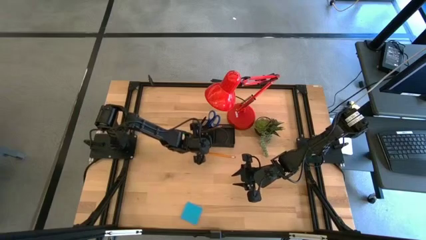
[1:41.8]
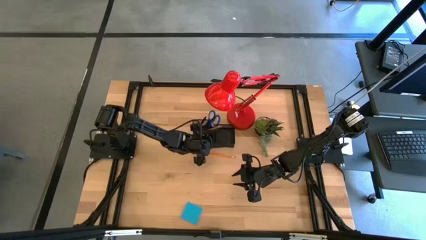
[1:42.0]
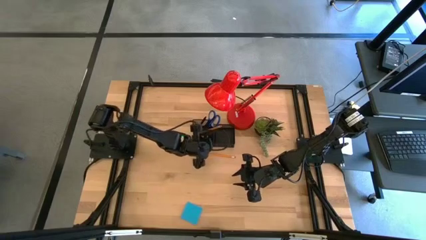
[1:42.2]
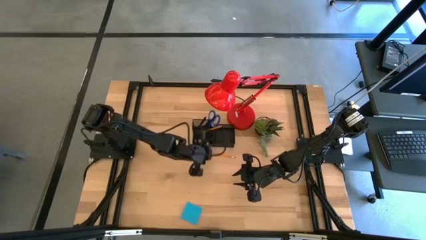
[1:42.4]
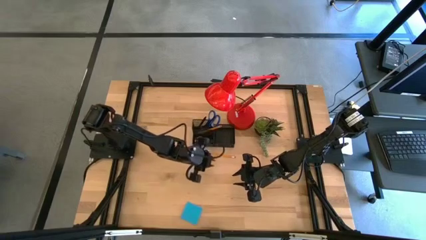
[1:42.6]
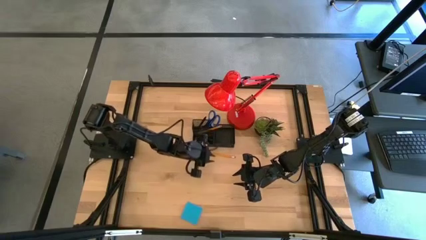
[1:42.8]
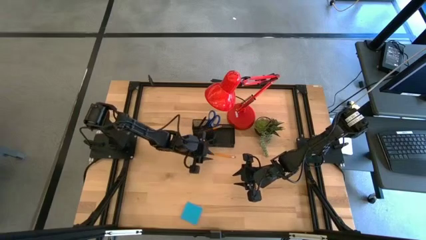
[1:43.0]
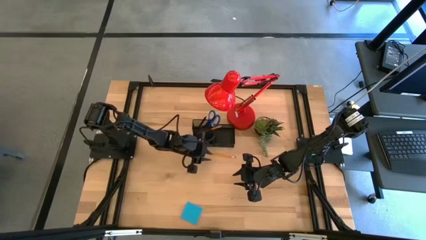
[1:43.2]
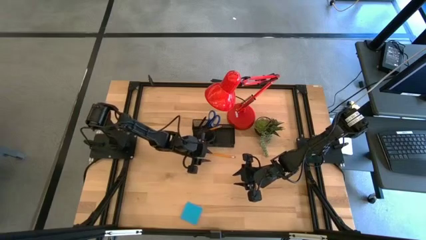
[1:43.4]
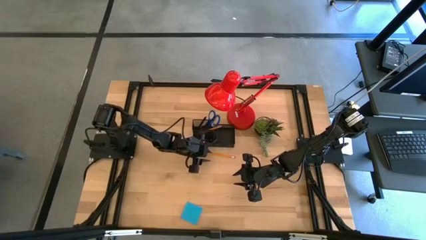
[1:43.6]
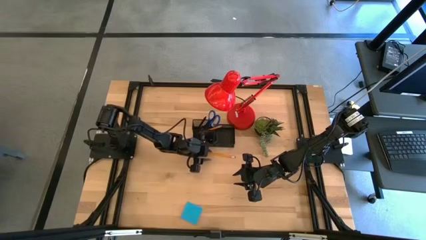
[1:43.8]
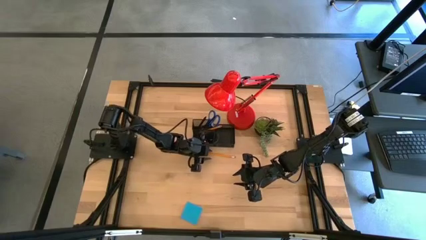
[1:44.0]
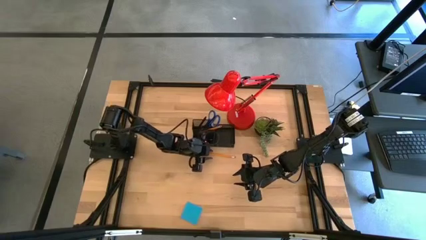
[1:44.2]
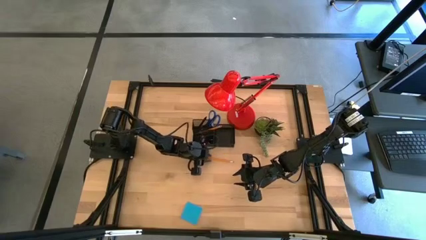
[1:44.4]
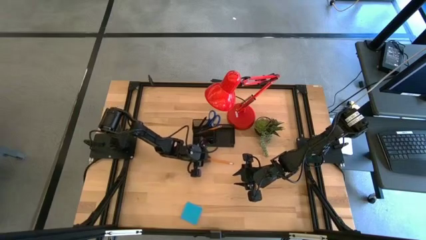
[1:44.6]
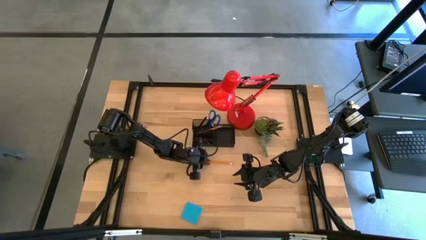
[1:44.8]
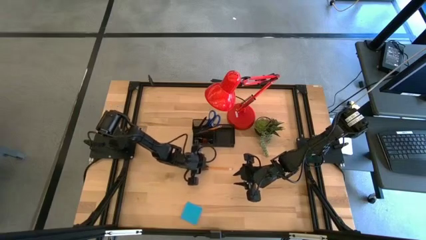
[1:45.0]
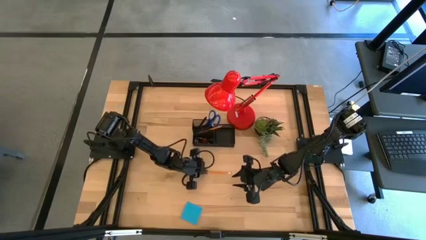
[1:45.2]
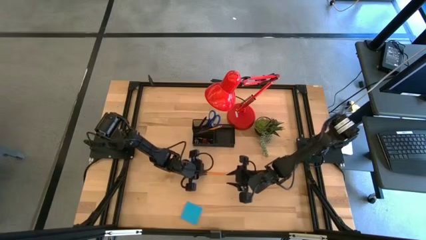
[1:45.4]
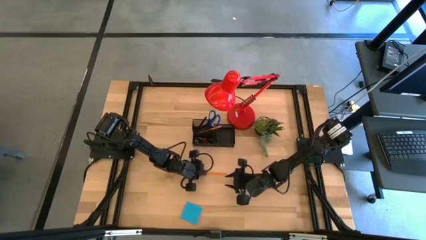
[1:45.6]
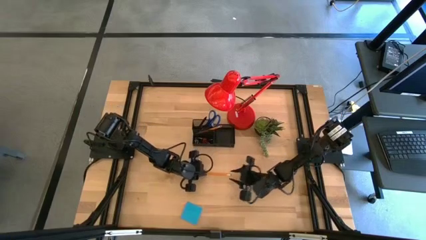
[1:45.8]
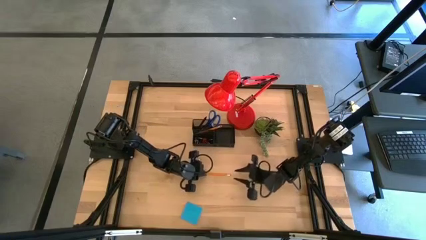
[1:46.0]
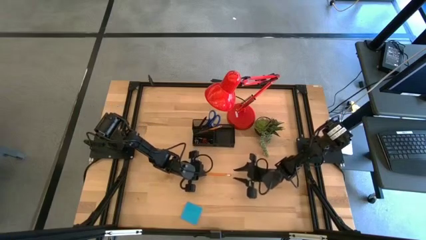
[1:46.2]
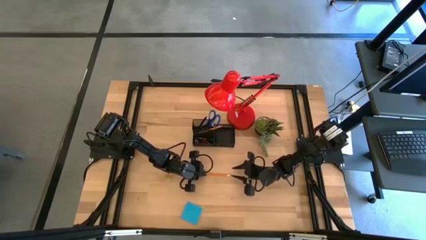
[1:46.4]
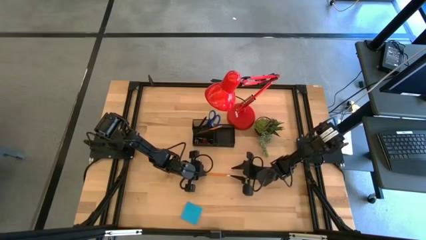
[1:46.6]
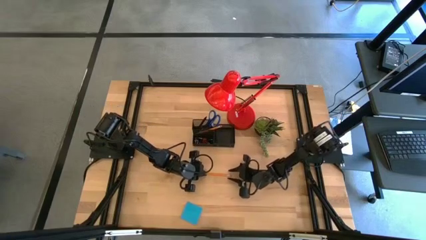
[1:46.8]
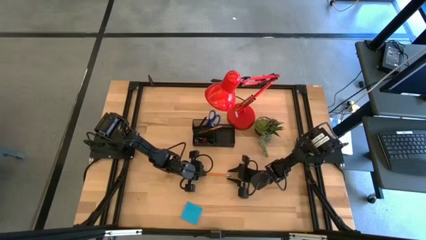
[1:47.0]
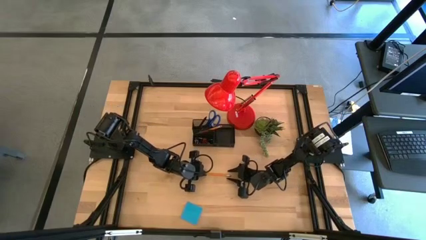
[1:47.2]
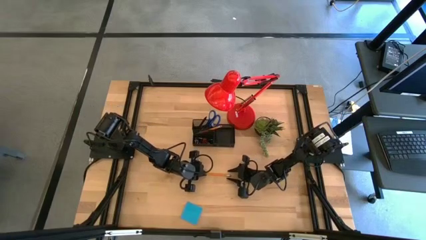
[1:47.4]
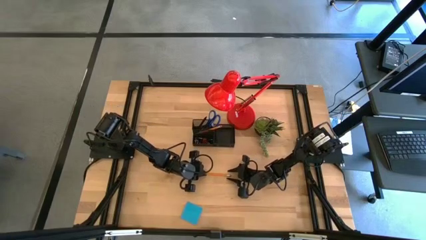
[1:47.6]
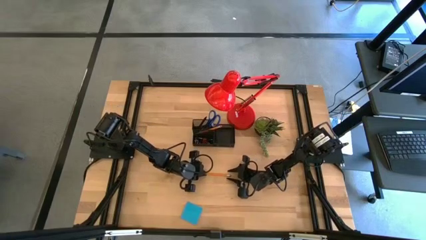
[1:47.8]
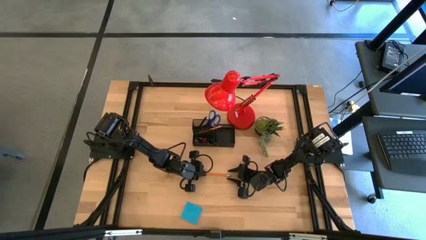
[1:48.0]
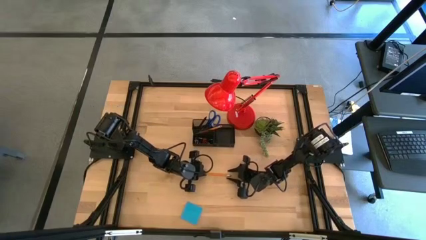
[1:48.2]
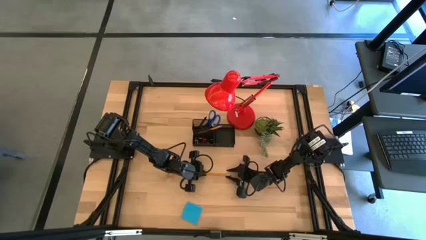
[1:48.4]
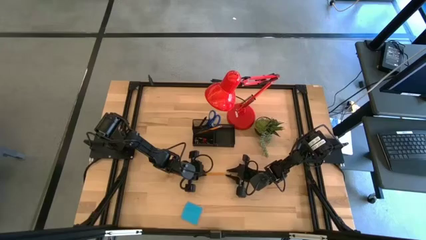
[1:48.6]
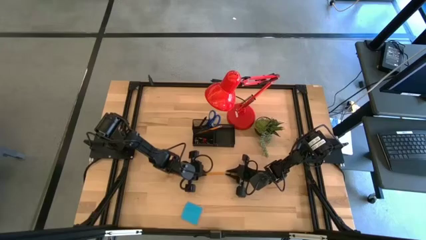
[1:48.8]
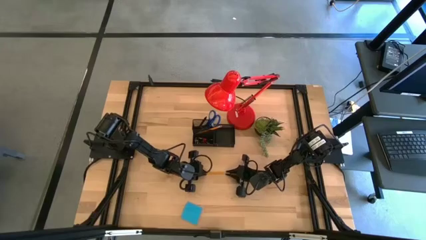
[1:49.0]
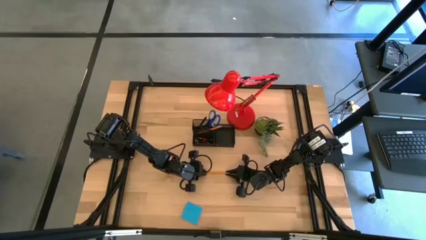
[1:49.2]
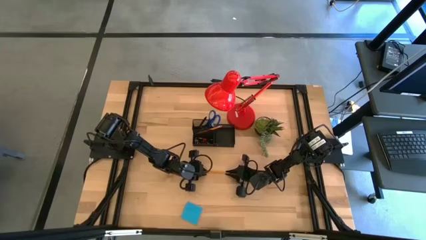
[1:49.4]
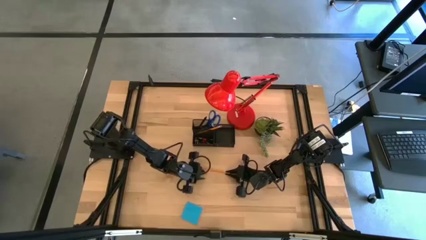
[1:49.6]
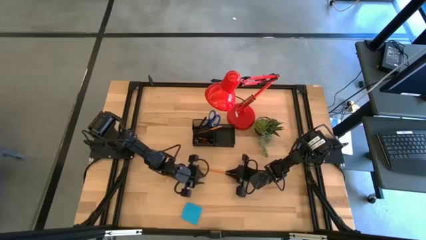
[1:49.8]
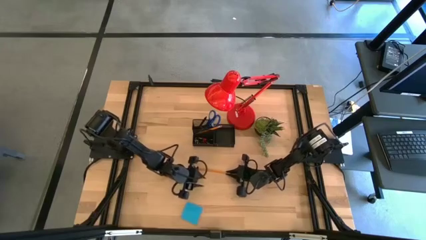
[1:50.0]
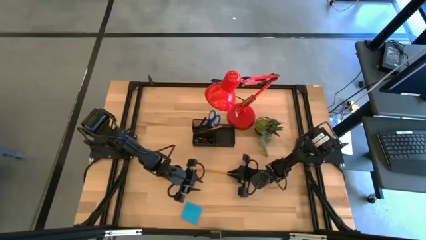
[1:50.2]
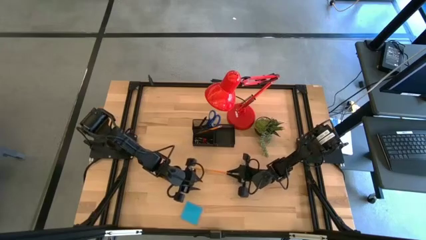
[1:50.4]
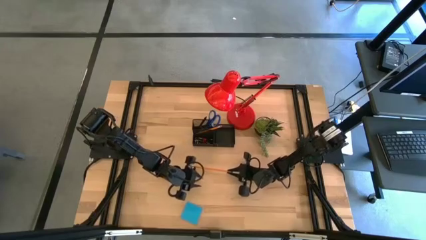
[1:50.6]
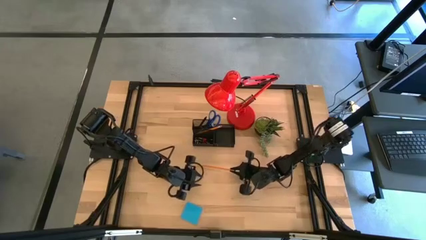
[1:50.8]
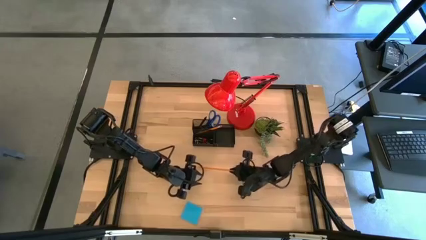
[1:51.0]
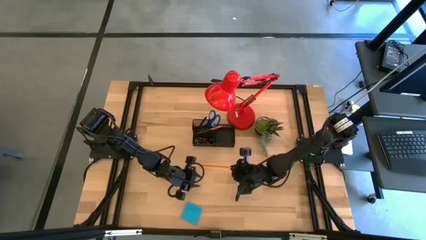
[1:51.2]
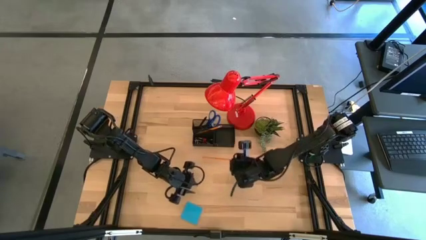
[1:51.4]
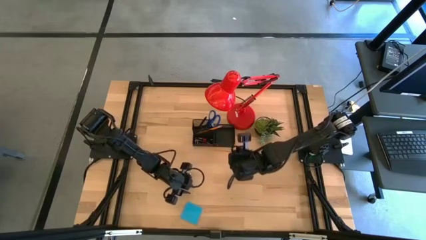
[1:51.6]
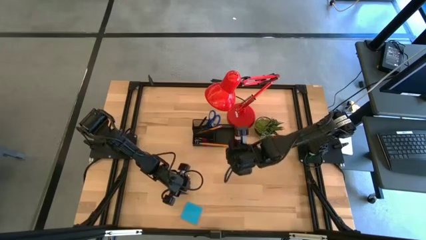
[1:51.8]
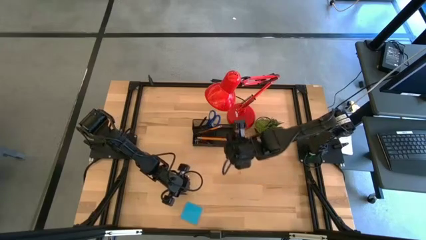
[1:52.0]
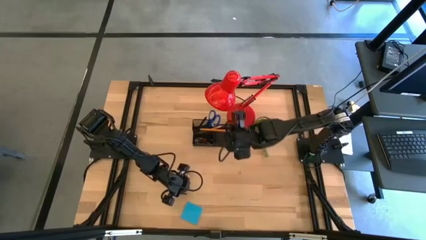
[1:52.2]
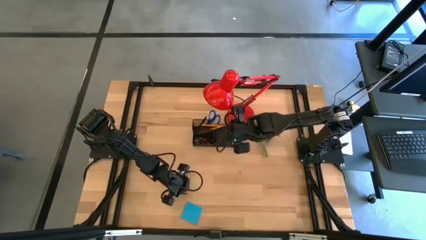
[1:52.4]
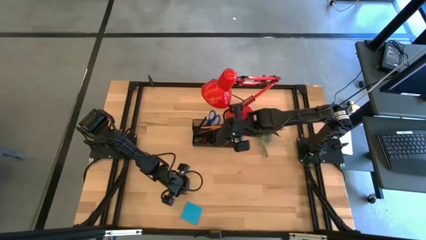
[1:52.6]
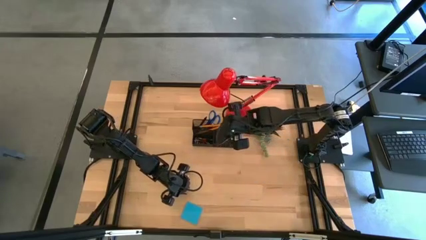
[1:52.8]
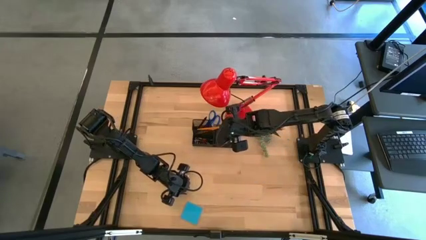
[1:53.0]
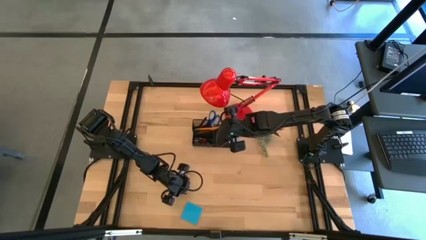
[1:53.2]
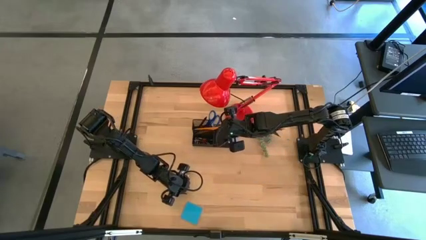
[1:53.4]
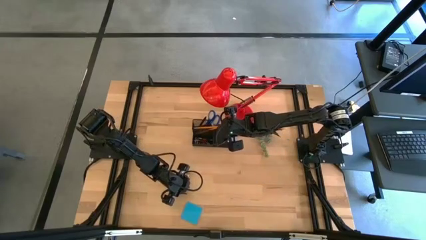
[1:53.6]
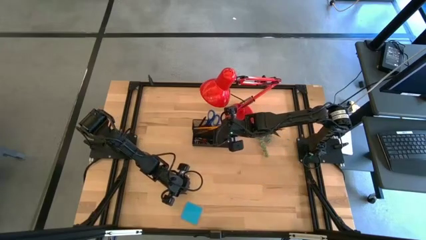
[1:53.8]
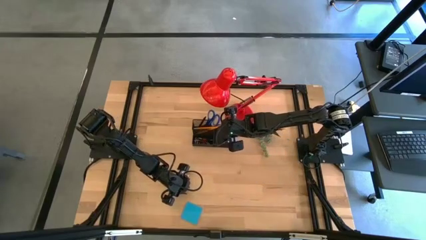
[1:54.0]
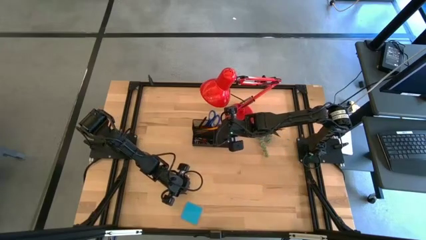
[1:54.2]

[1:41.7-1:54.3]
Task: Pick and place office supplies into organizer
Put the orange pencil into the black desk organizer

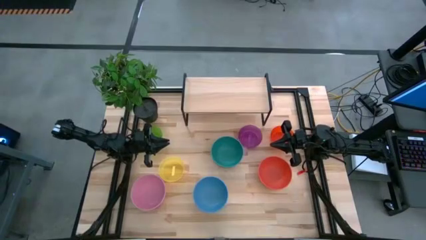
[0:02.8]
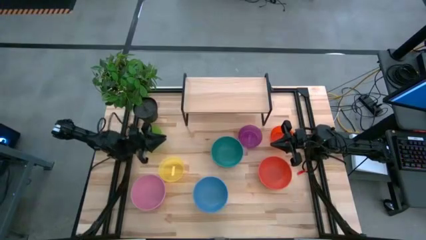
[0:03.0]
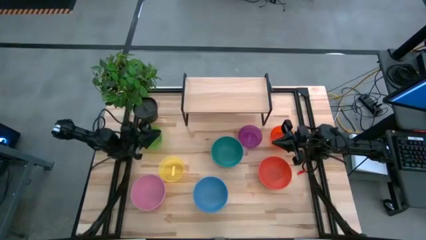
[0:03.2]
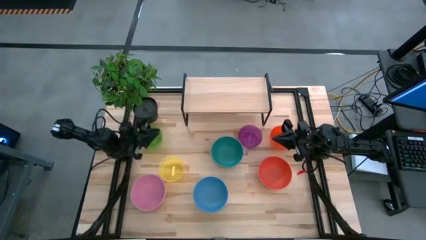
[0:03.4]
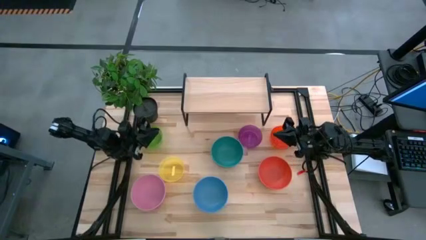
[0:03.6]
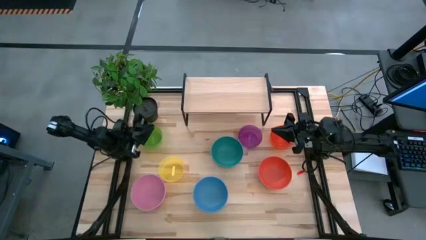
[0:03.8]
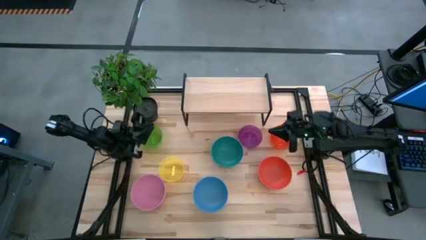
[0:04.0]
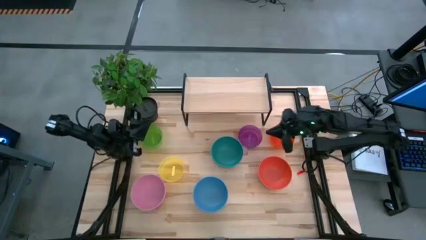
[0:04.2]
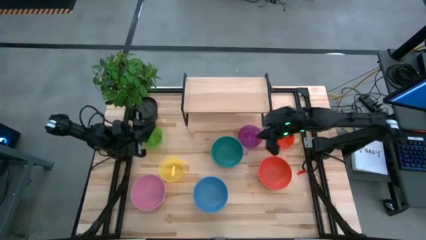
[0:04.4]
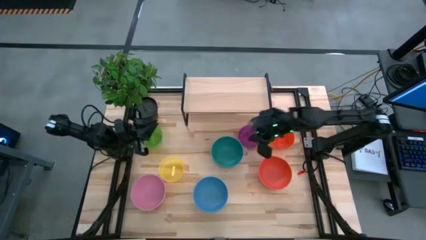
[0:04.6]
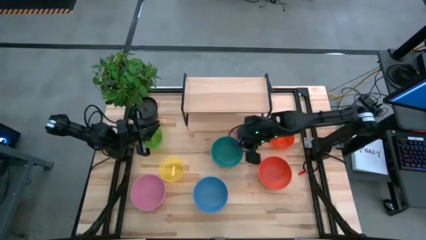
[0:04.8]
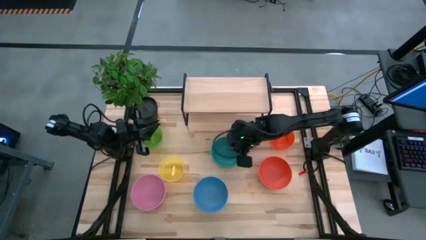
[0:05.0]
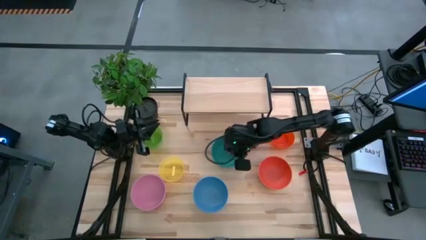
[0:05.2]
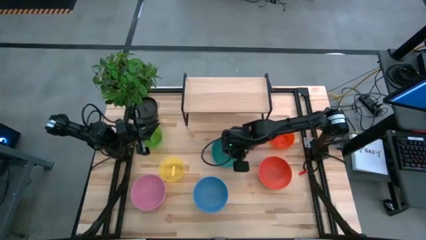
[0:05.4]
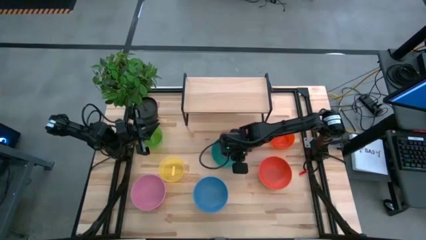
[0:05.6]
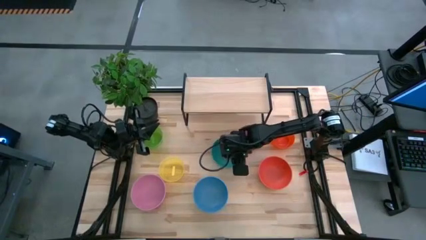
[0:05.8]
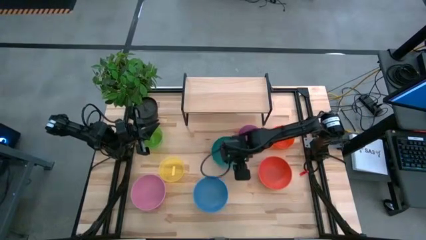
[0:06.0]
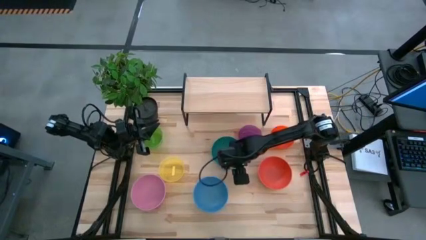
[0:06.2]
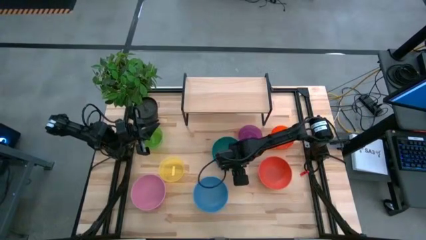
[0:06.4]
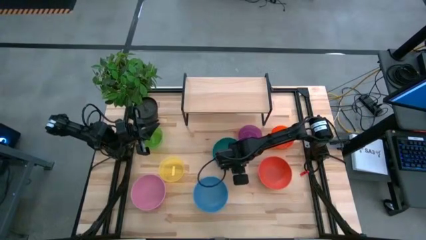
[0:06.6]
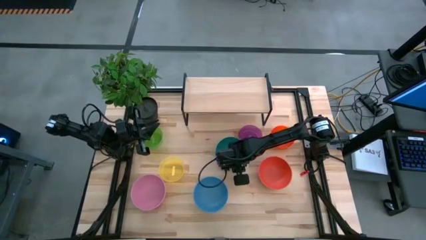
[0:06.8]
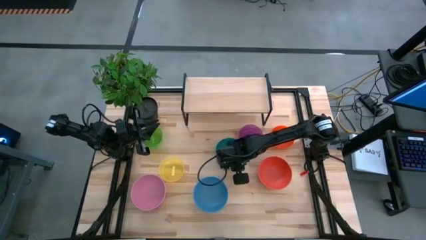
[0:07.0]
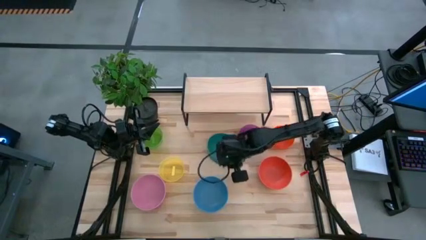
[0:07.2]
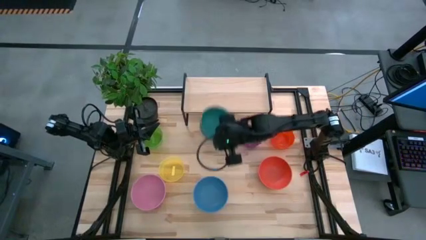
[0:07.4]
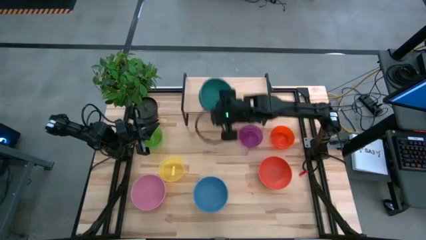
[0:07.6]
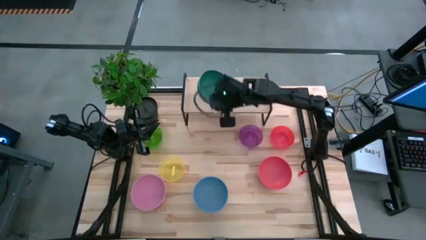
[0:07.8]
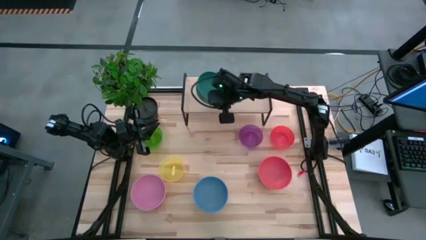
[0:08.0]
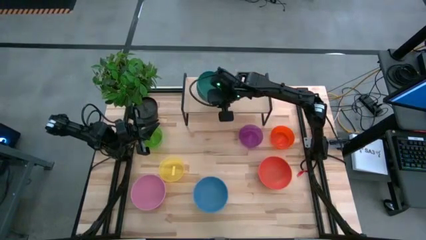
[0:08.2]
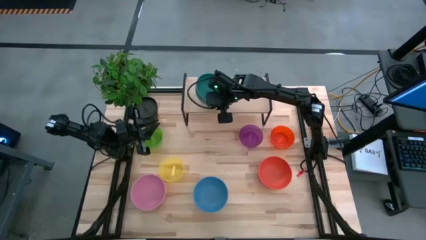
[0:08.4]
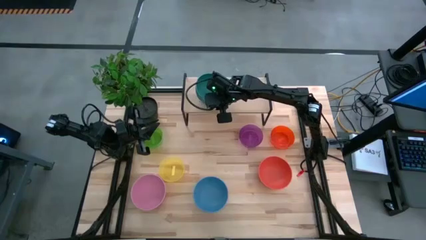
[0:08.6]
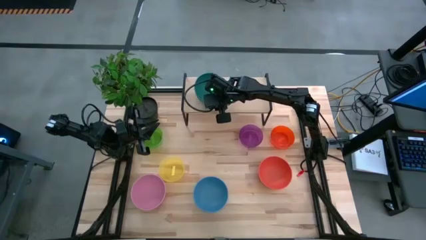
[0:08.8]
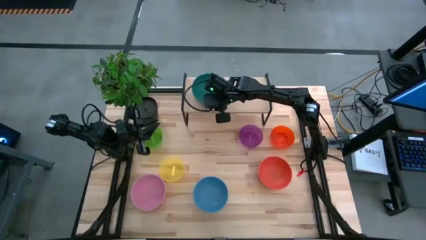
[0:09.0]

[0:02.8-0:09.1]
Task: Place and stack bowls onto a shelf
Put the big dark green bowl on the shelf
